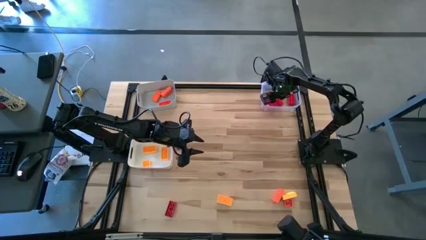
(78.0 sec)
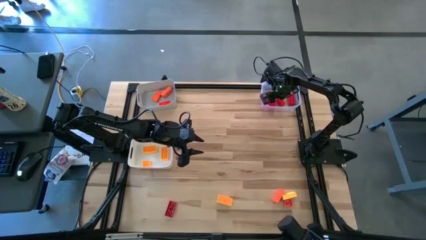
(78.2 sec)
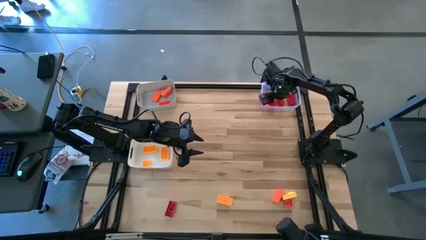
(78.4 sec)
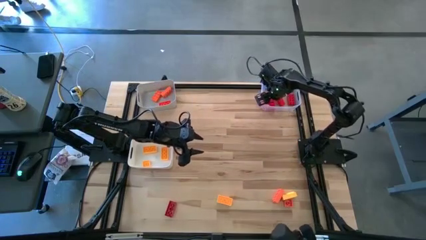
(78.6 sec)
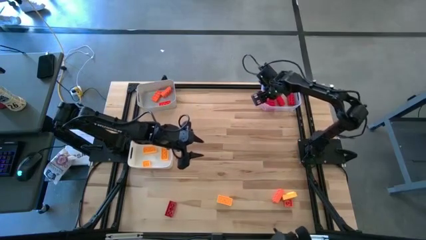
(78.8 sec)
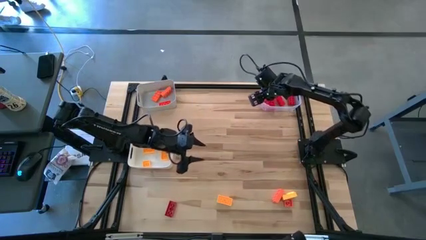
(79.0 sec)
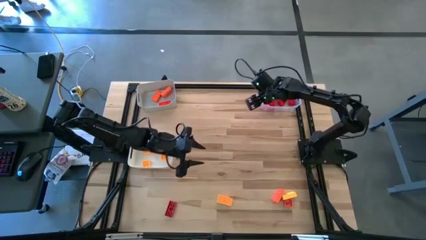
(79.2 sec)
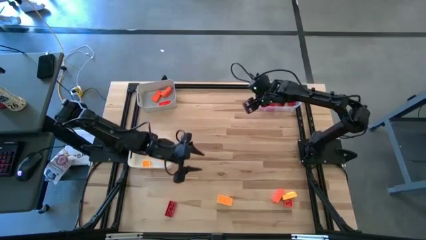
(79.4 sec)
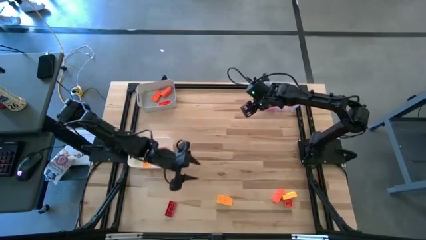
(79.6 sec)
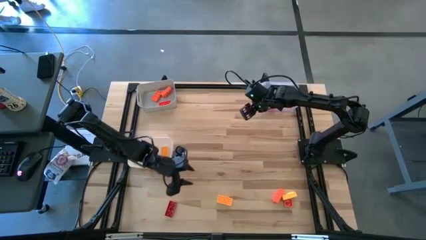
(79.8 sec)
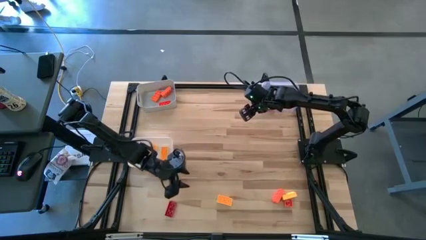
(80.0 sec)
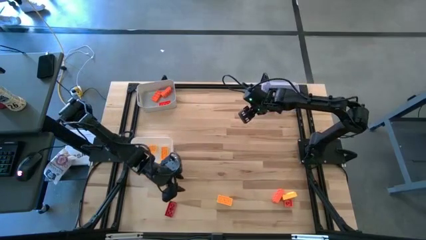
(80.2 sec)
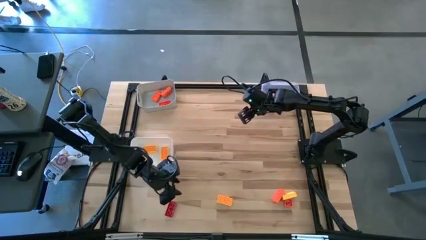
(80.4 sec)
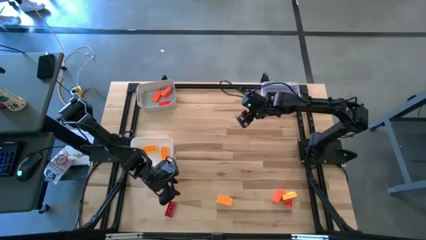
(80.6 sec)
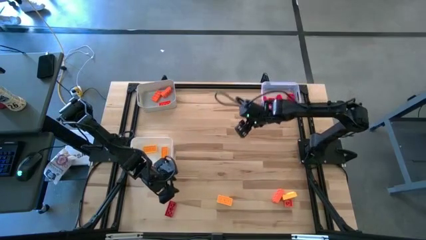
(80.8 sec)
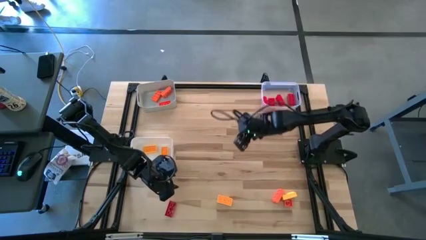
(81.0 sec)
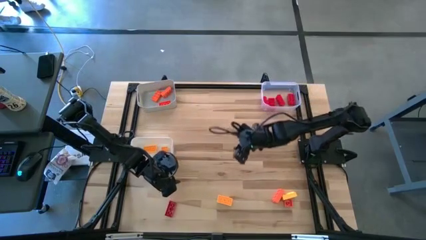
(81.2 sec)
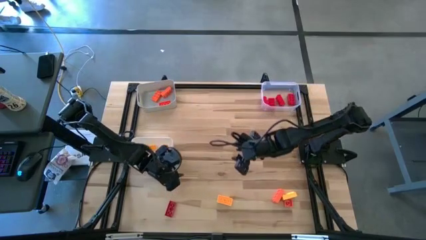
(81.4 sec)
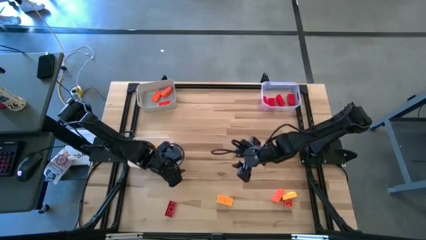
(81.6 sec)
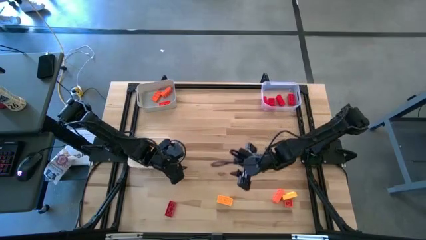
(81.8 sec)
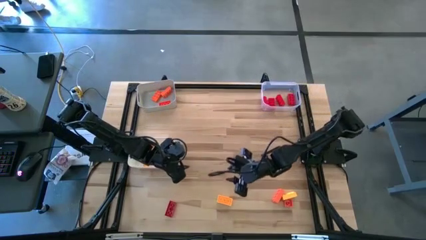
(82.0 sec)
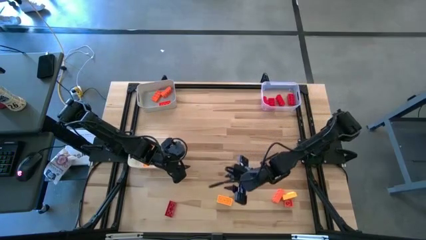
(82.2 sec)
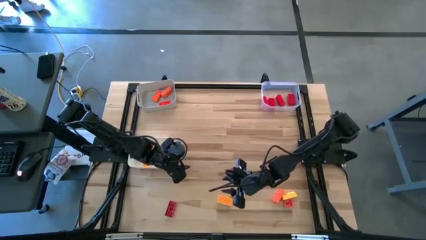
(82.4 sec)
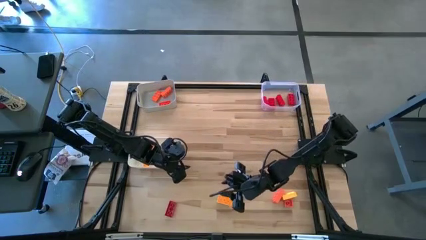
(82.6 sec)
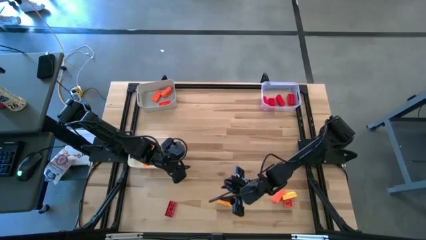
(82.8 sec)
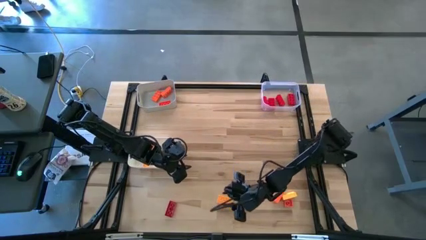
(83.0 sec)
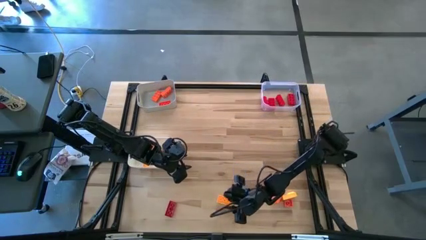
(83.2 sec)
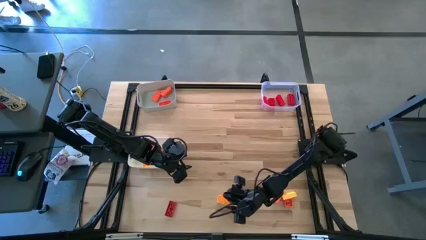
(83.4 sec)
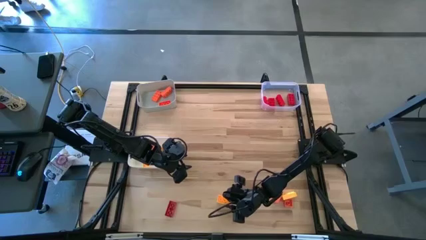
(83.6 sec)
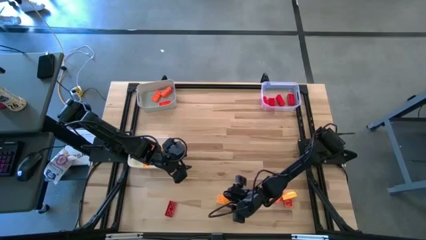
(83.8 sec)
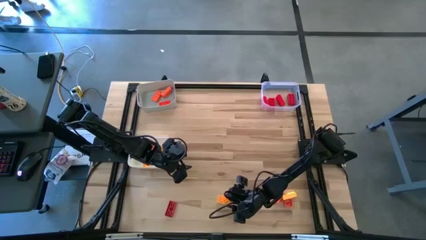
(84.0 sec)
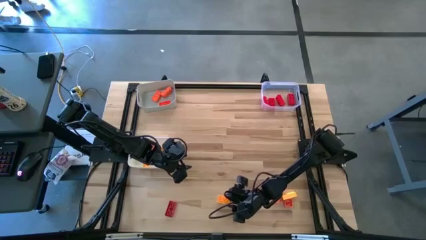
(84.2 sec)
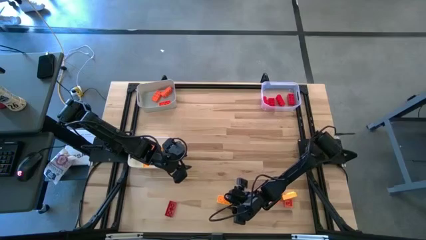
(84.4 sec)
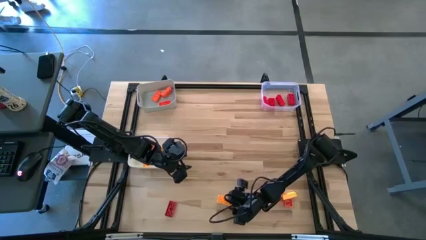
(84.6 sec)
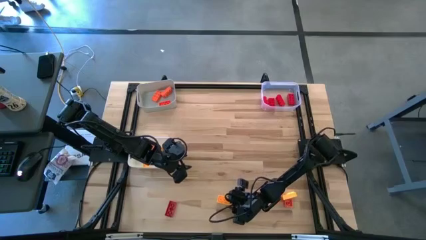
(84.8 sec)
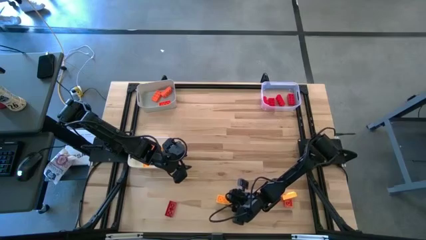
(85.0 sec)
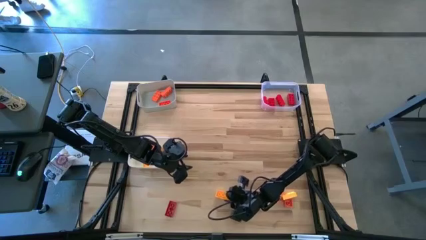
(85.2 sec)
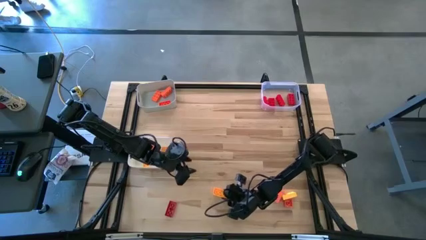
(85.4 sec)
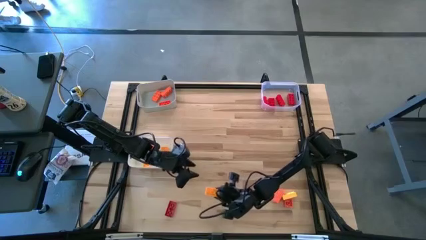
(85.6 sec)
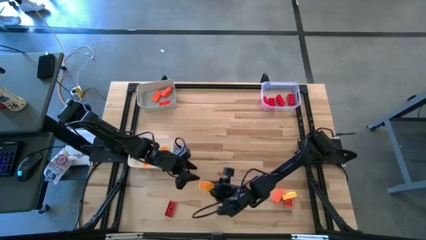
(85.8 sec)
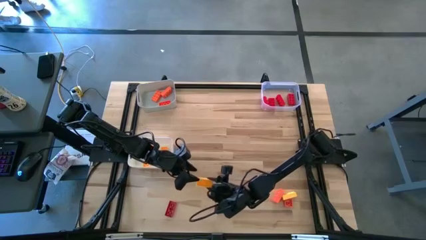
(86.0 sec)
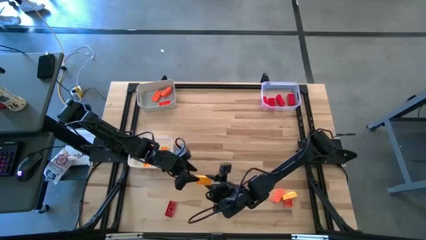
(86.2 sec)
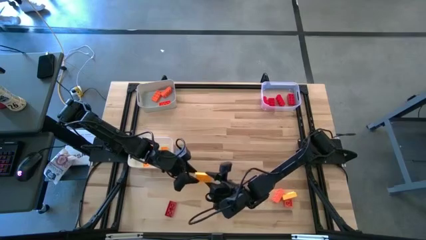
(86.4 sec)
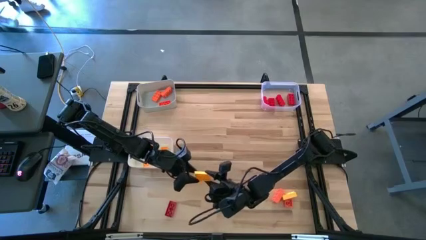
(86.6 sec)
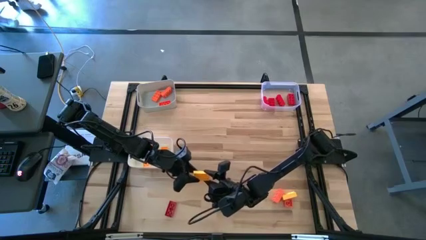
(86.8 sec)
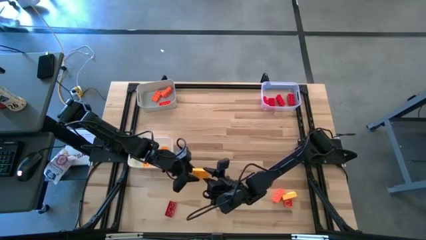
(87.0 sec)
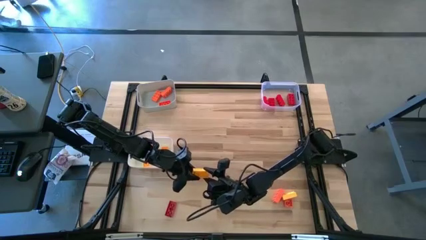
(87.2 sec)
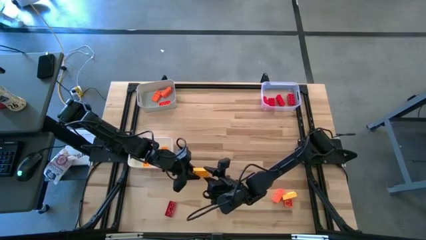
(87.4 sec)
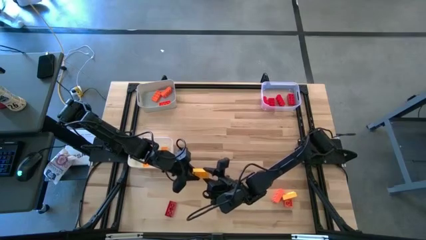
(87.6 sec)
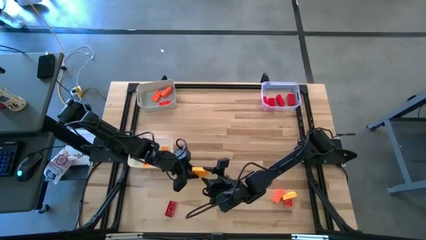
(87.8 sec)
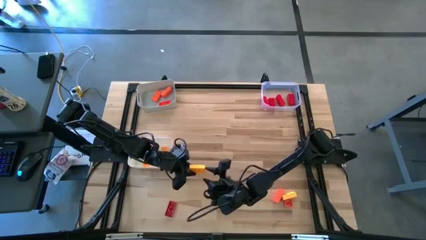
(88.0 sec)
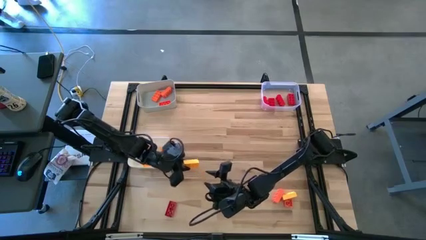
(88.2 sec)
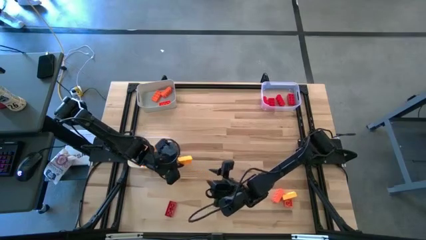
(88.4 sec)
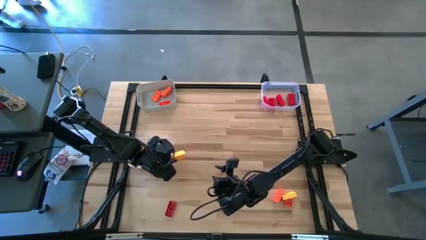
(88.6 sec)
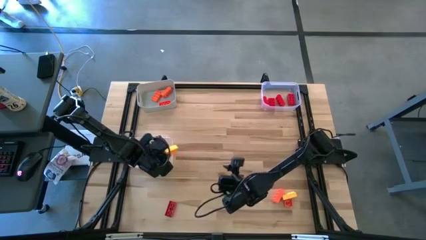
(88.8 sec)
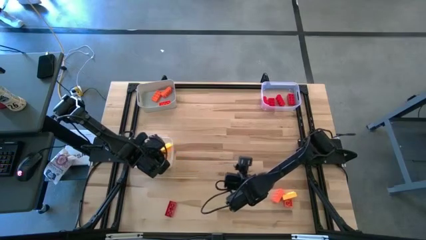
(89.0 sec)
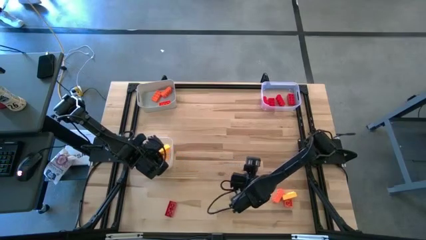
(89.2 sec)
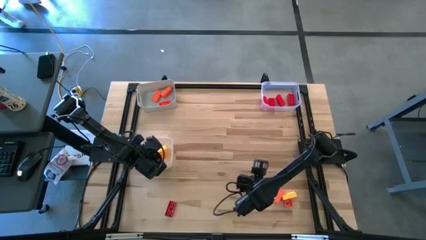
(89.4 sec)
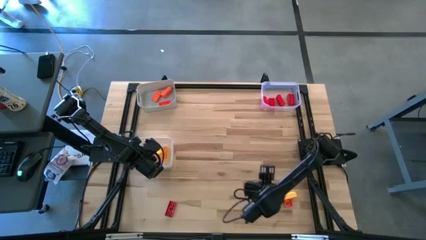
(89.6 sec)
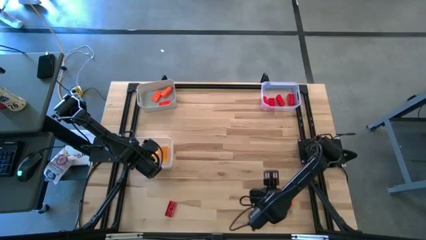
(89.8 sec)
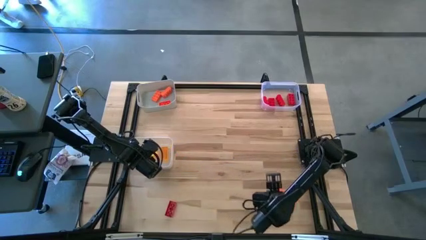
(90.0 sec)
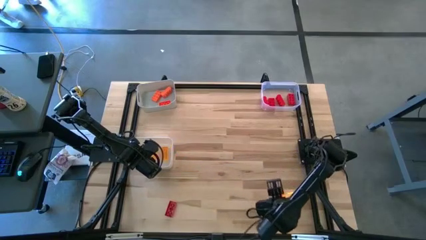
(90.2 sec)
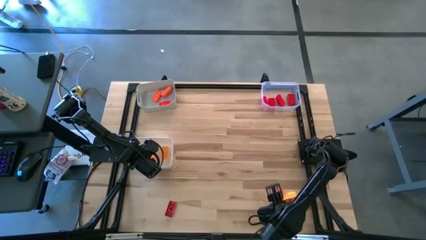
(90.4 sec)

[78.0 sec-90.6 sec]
Task: Sort & place blocks by color
Put the yellow game piece into the white bin

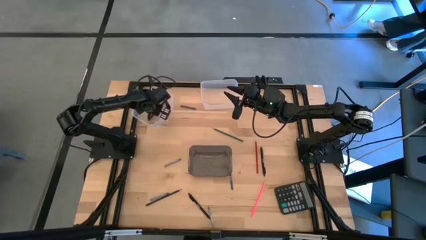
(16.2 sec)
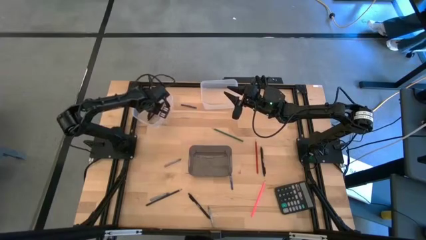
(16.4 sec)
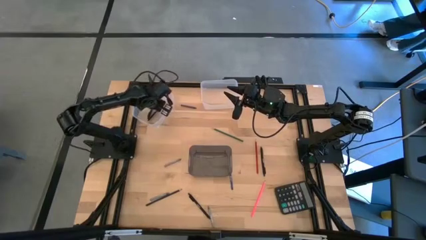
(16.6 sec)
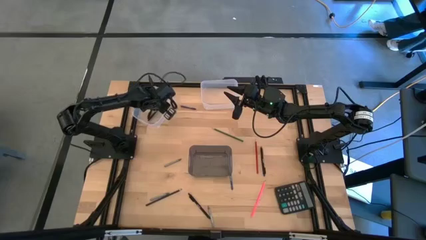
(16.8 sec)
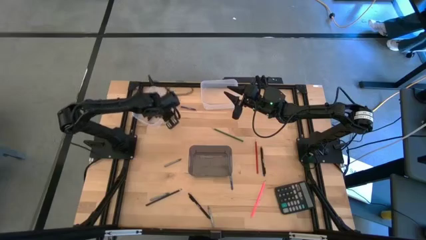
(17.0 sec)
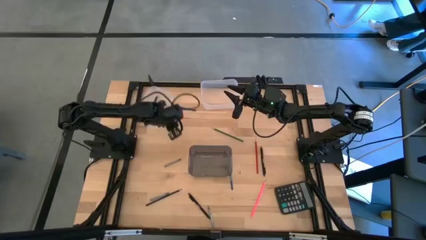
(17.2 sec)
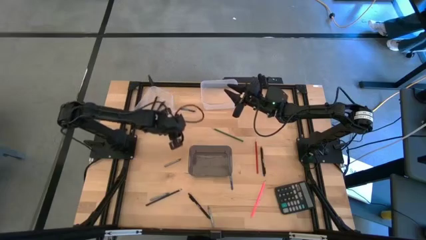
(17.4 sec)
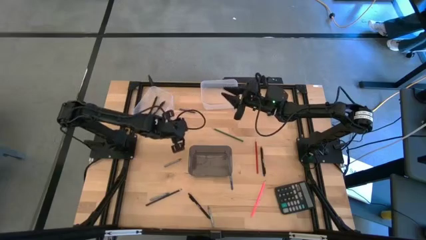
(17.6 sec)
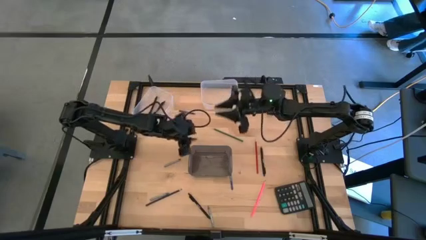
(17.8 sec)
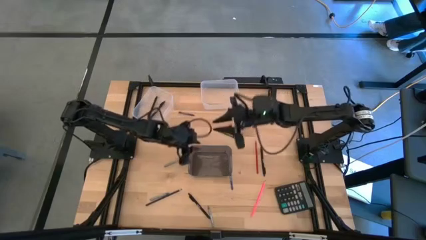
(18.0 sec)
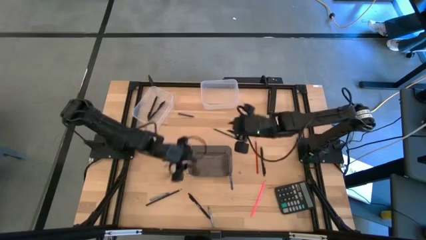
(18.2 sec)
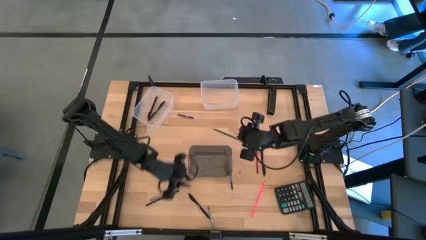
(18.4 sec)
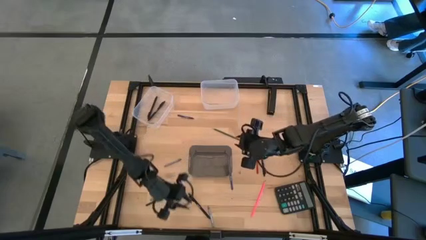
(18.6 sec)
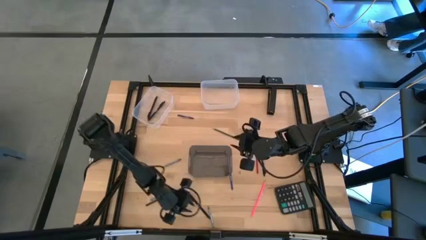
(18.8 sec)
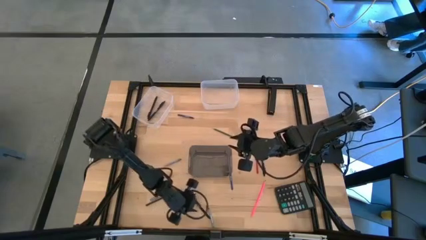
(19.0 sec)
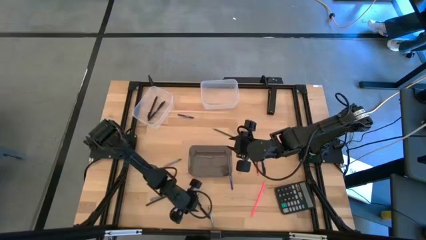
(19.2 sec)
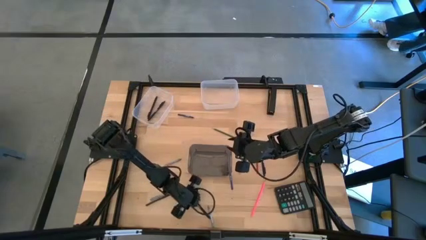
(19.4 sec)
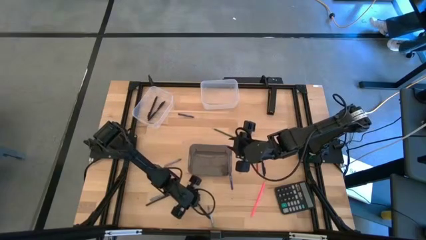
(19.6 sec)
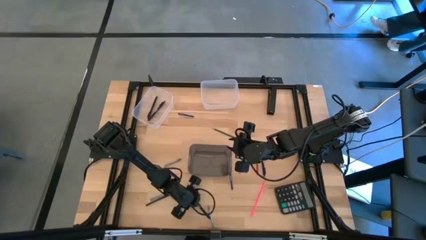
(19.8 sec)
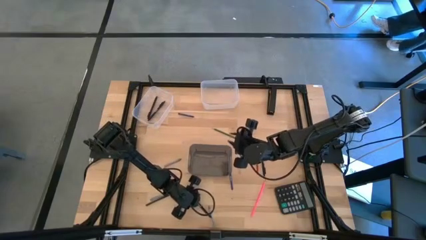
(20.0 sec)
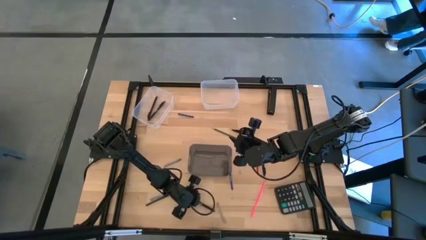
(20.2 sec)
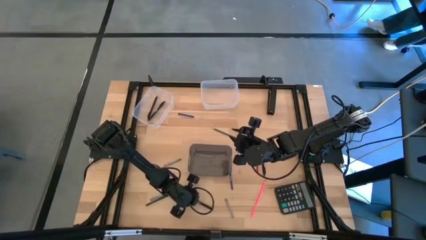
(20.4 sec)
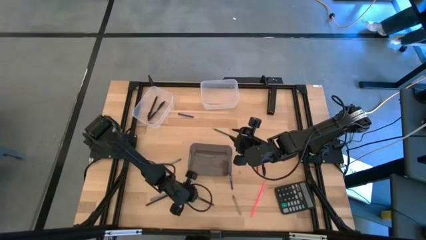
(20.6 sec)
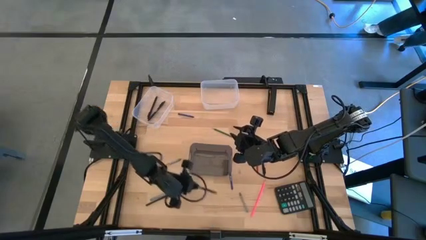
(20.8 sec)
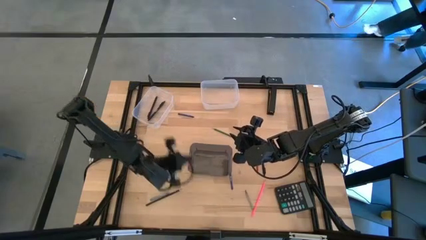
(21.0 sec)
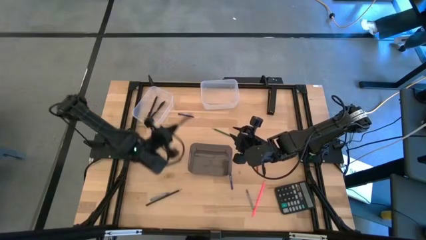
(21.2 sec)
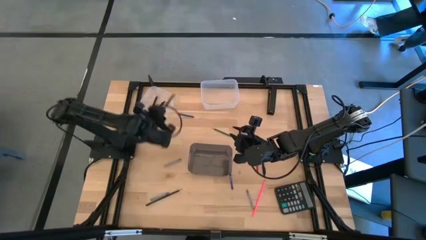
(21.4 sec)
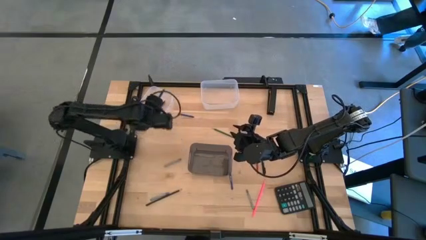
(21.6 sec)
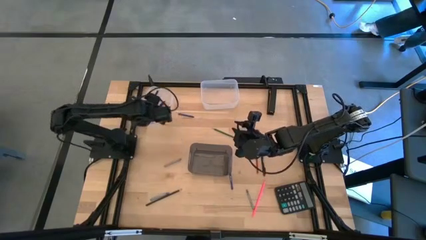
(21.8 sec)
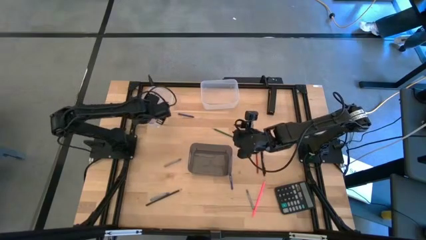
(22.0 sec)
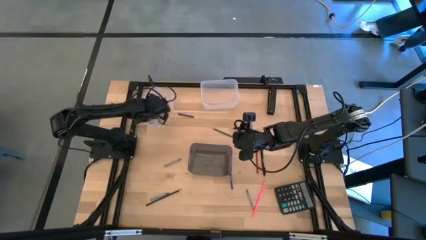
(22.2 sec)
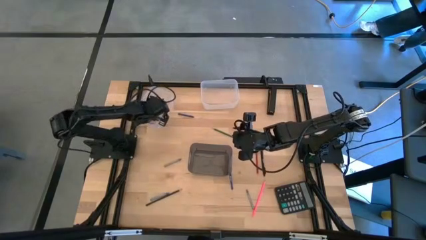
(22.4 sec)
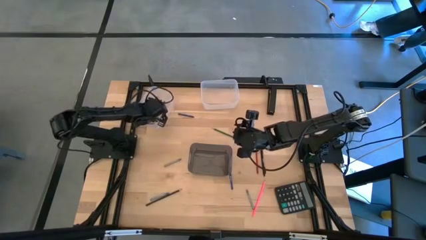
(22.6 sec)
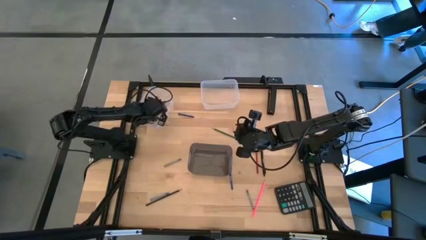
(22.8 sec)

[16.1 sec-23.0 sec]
Task: Sort crayons/erasers/pens/pencils in bins
Put the black pen into the left transparent bin
